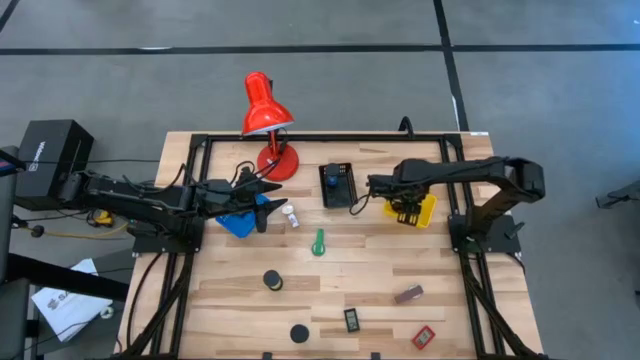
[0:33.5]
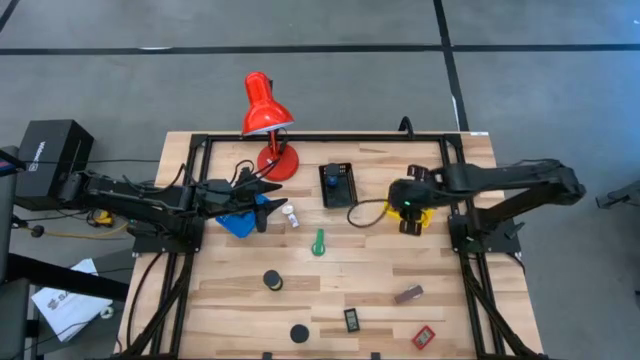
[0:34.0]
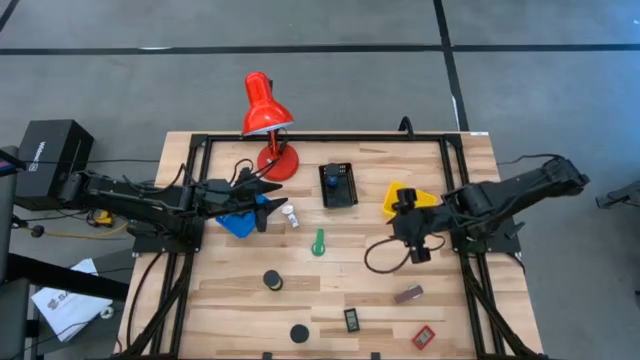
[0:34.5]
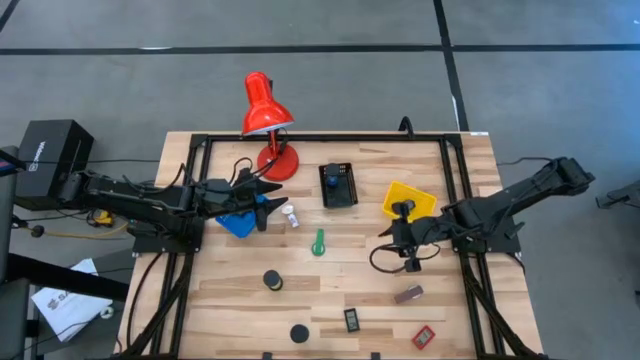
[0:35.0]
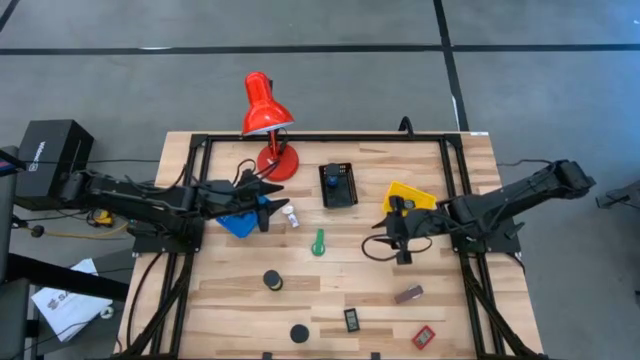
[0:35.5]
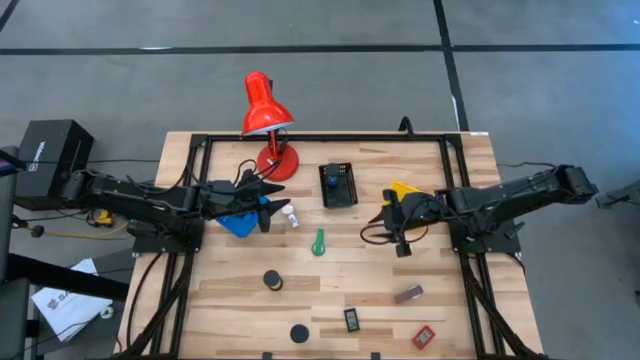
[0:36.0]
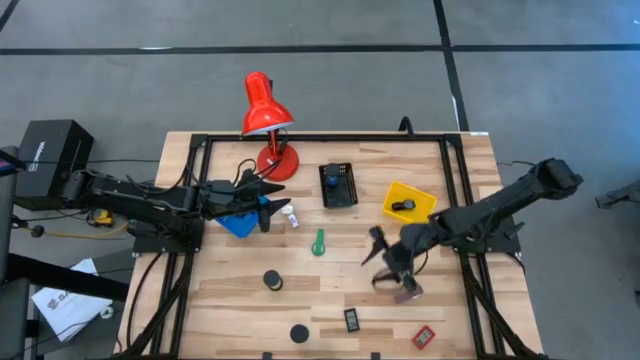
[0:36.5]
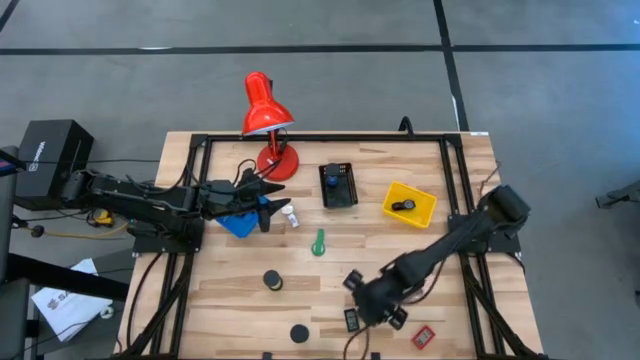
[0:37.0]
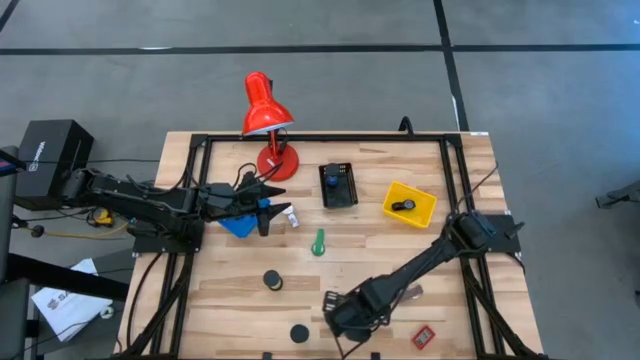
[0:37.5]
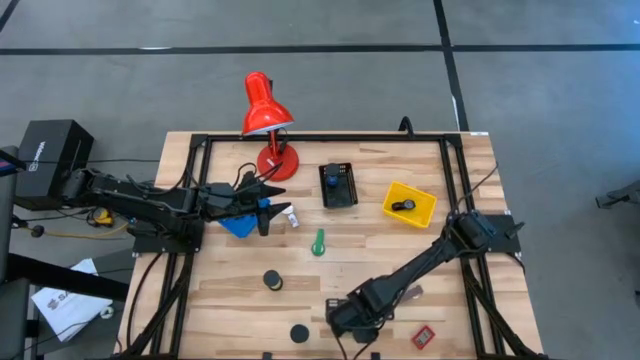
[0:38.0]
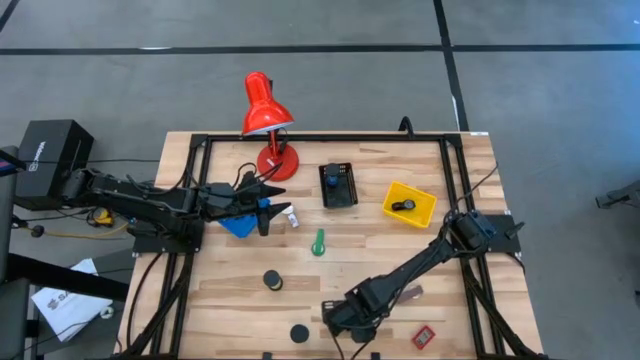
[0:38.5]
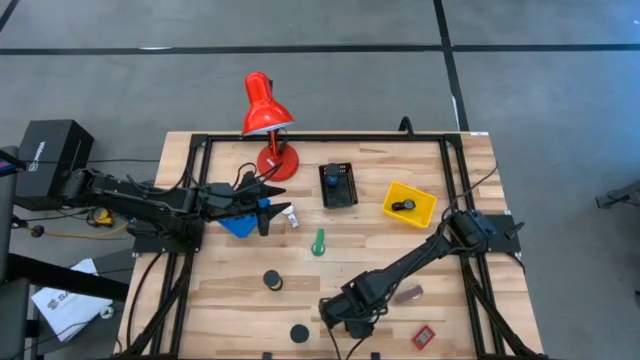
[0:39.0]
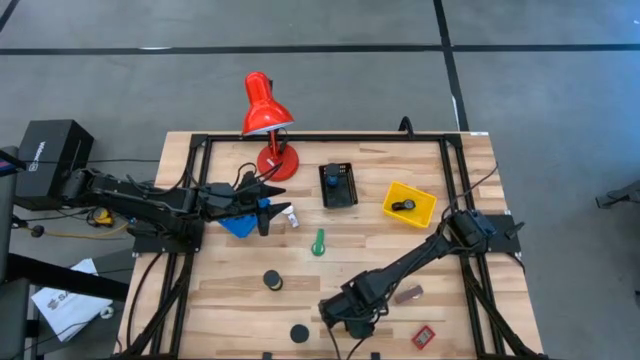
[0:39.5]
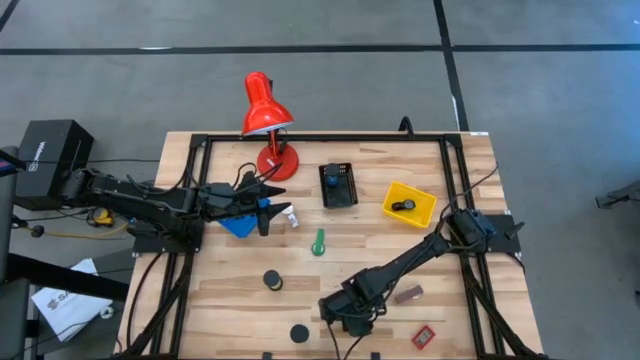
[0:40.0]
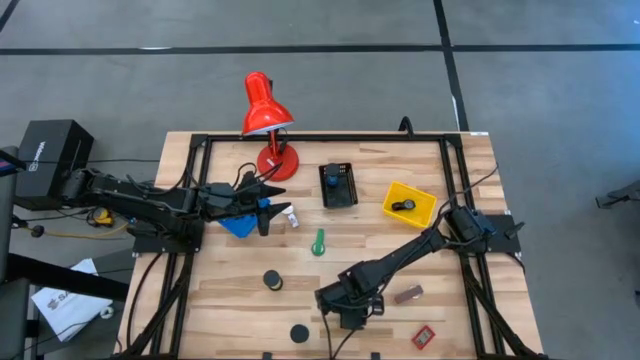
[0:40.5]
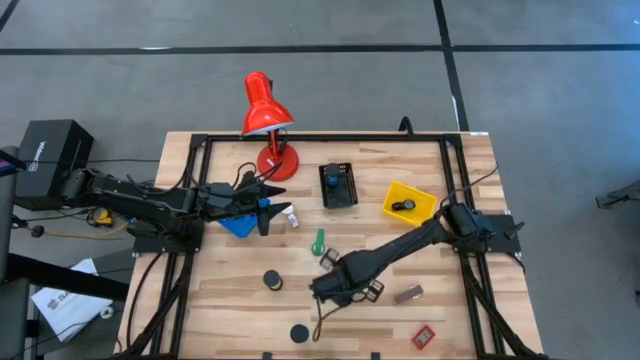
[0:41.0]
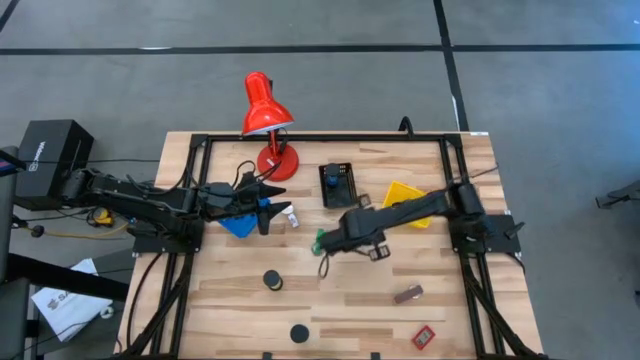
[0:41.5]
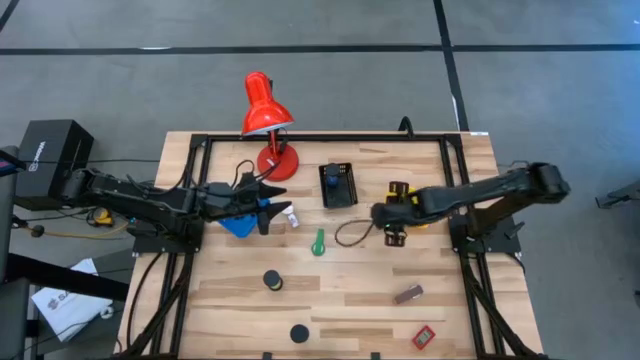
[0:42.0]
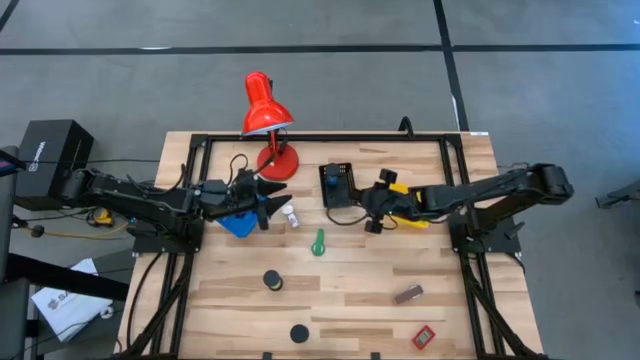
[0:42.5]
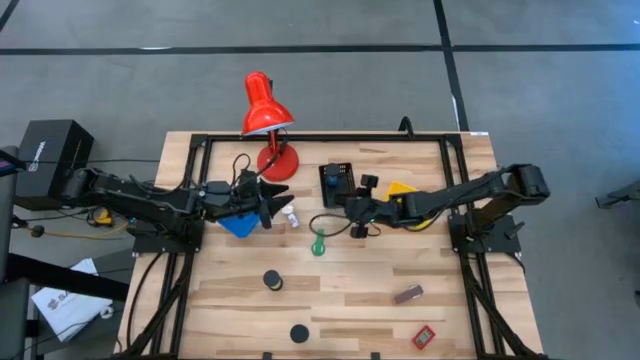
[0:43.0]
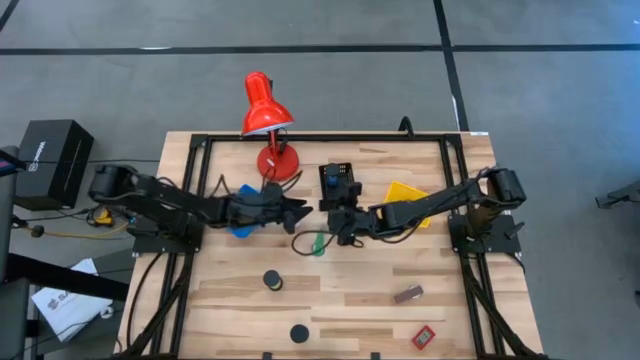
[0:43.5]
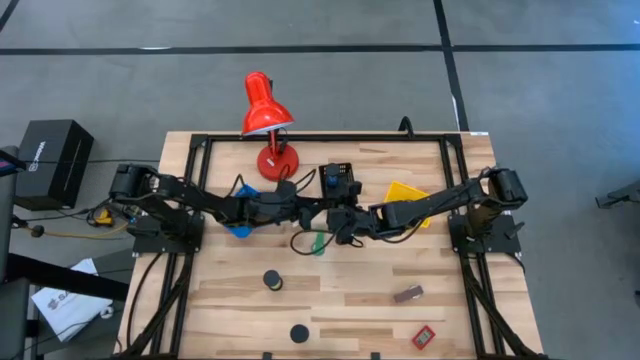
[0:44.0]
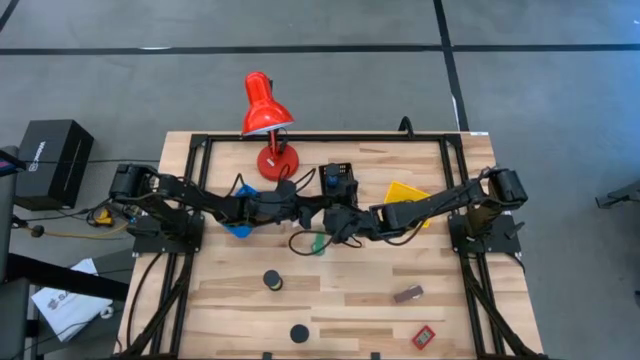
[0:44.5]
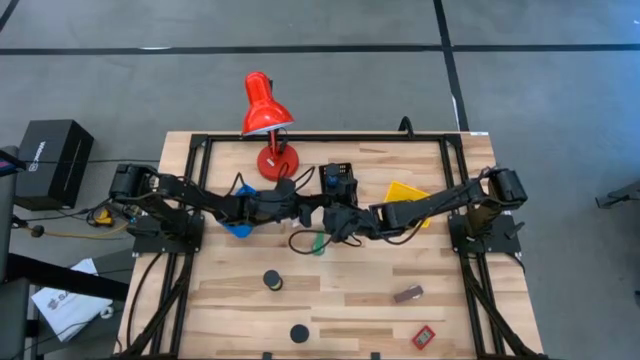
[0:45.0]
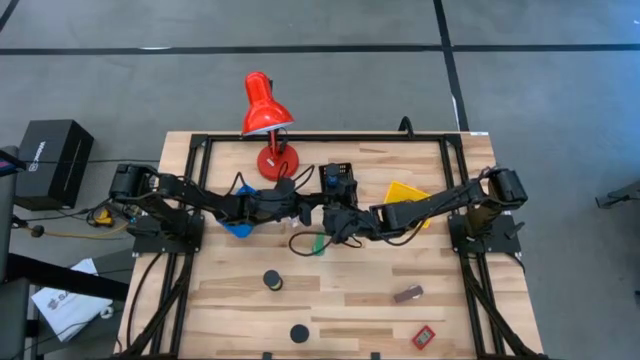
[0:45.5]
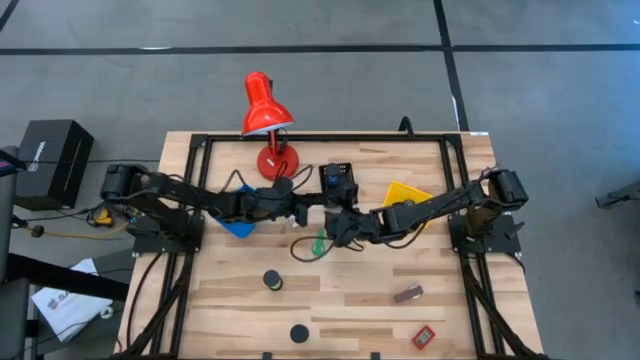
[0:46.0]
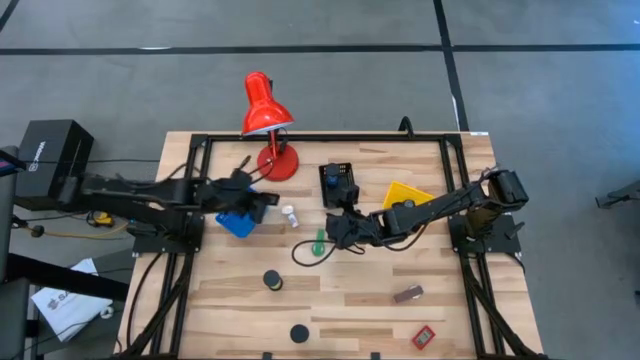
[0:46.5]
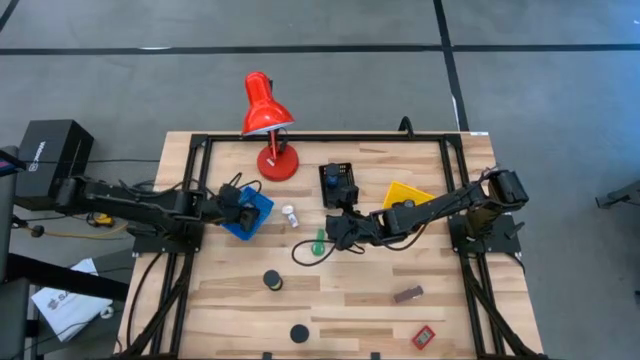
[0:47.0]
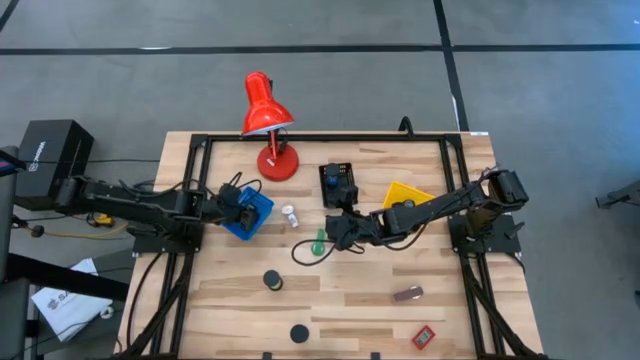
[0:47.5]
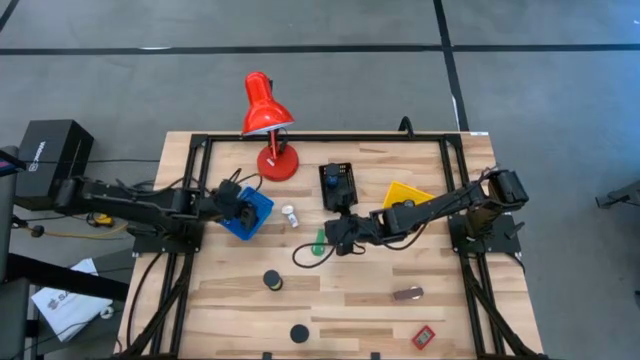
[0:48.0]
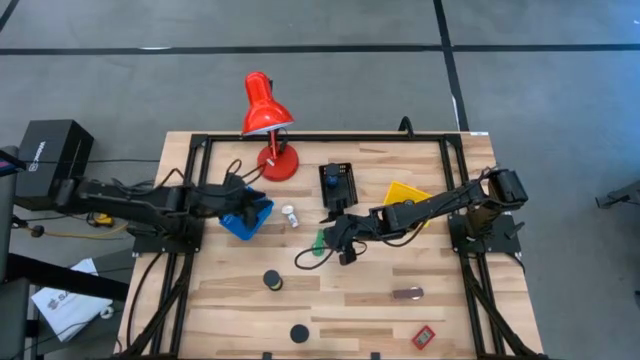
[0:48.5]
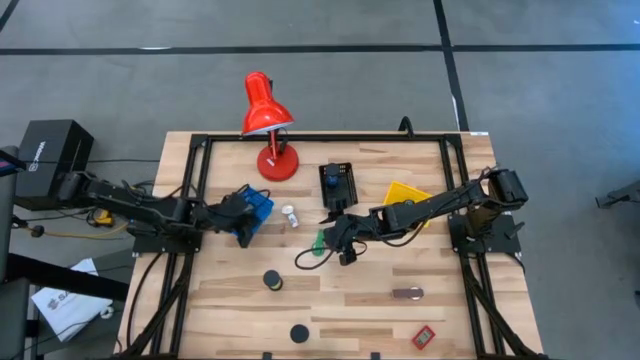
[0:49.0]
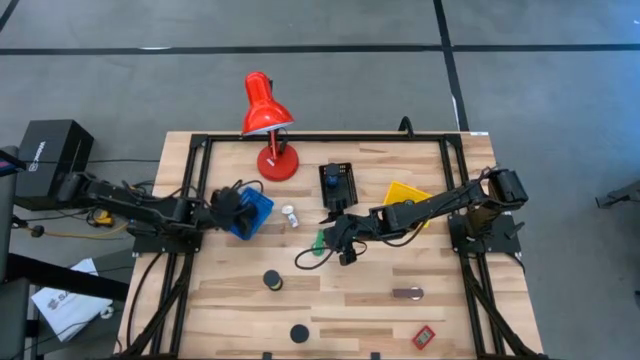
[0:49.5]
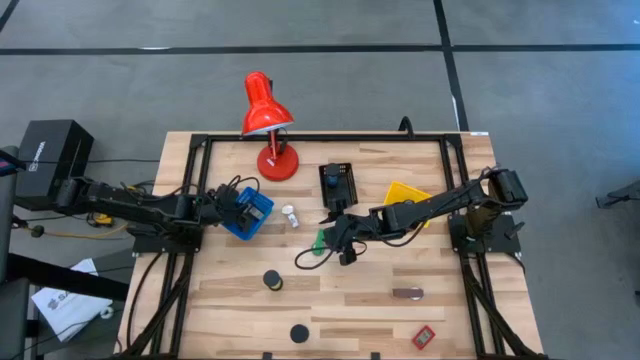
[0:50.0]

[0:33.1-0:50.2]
Task: Pick & Place Office items
Put the black digital clock into the blue basket

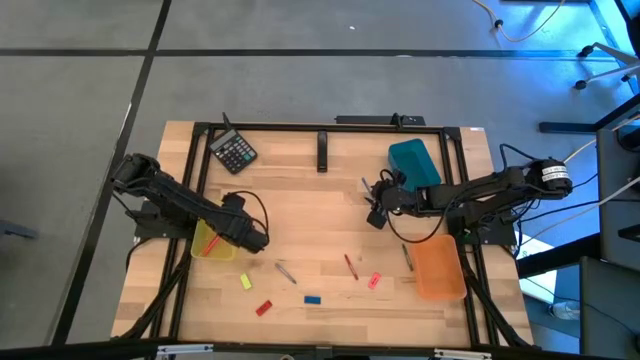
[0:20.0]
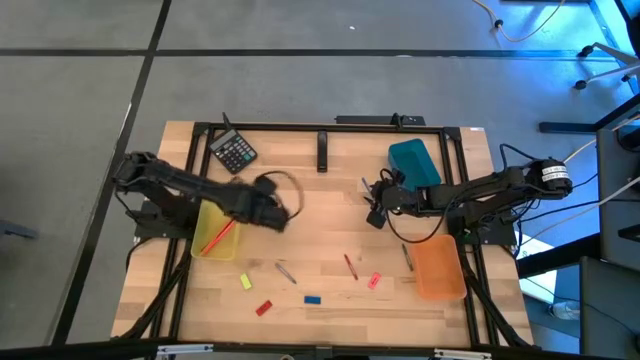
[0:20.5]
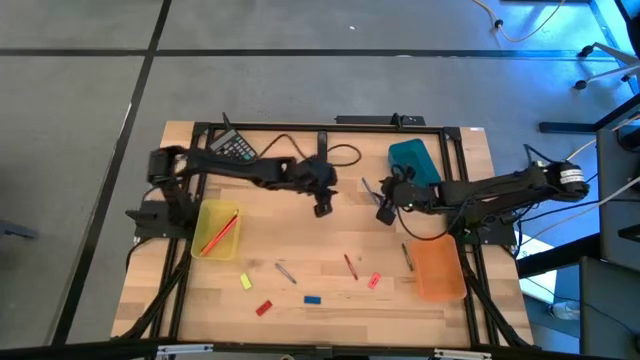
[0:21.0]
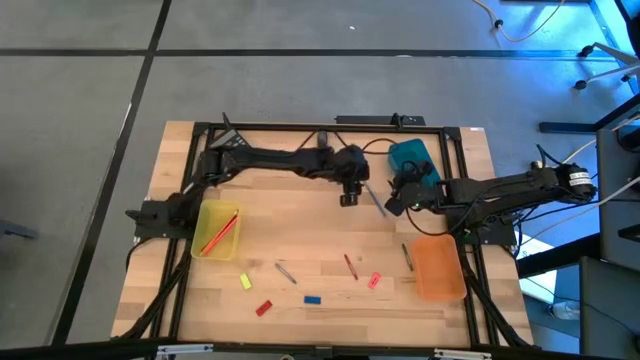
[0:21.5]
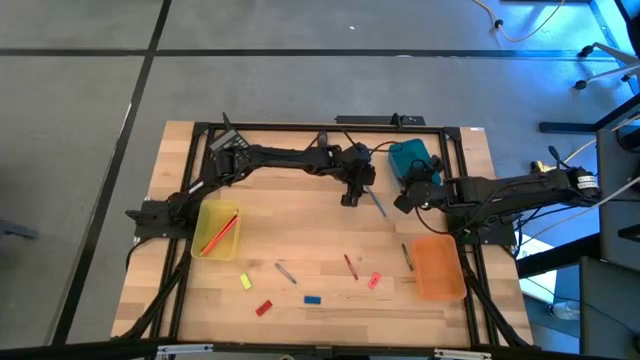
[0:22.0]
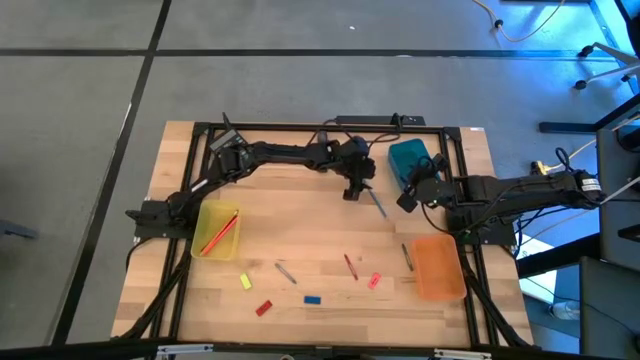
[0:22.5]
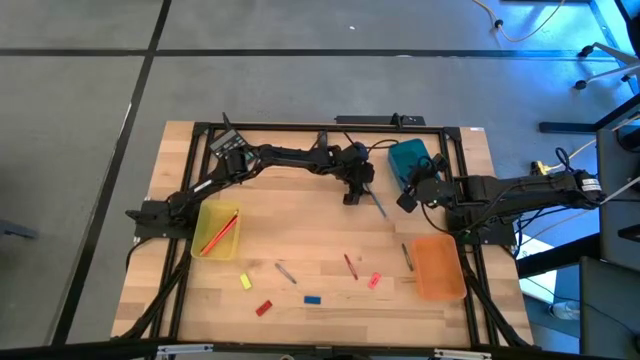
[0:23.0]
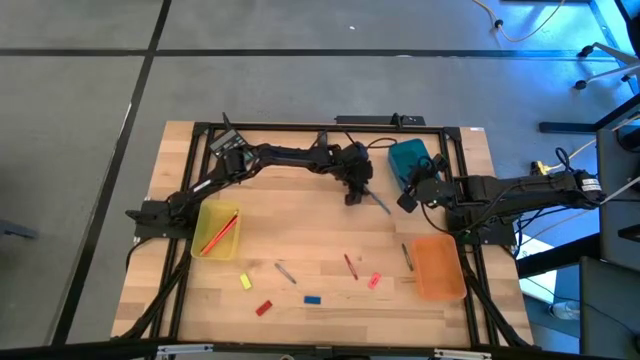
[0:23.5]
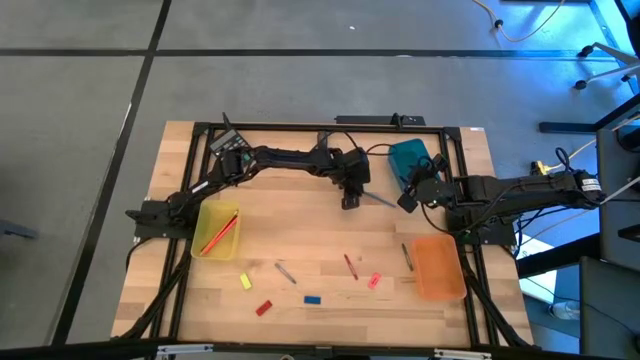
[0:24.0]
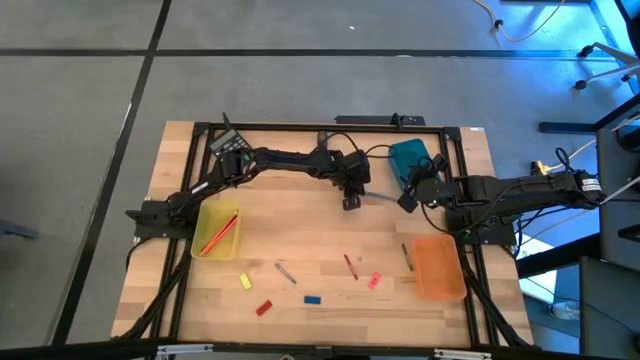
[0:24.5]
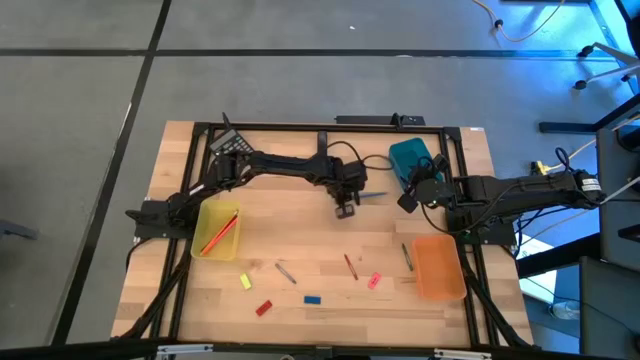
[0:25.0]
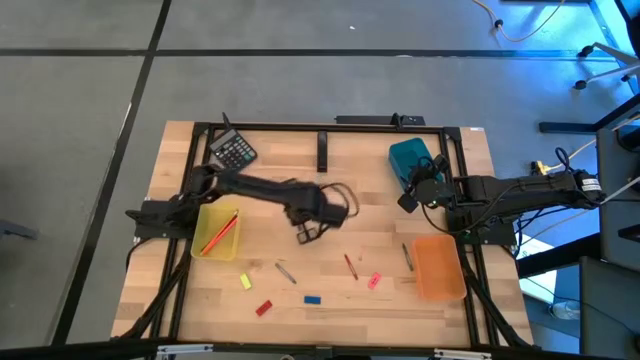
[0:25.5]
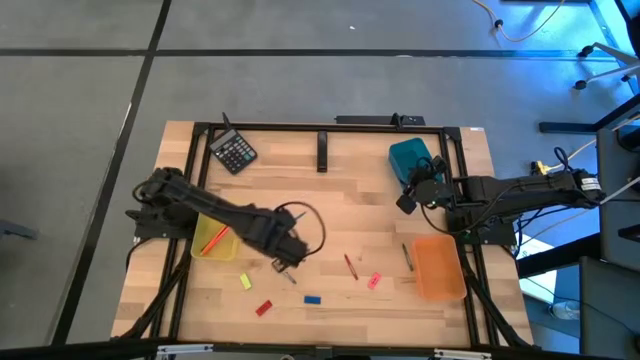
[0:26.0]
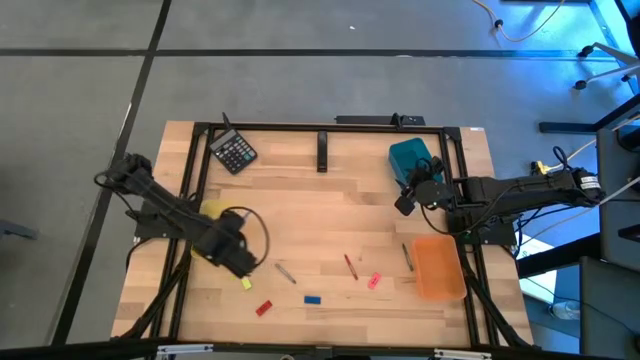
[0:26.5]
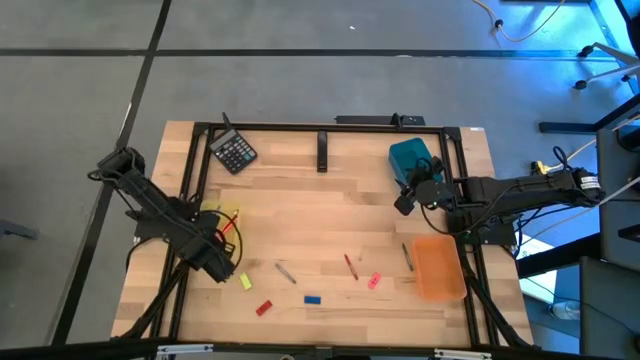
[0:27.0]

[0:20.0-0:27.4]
Task: Sort crayons/erasers/pens/pencils in bins
Put the blue pencil into the yellow bin
